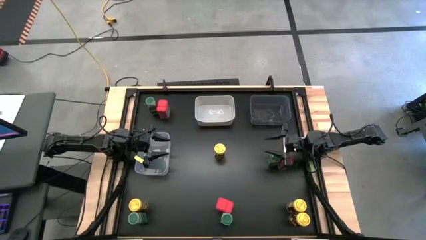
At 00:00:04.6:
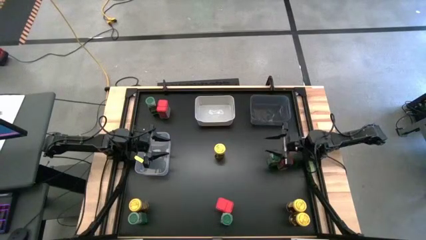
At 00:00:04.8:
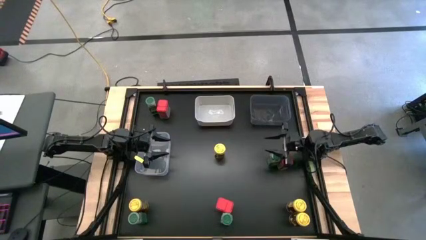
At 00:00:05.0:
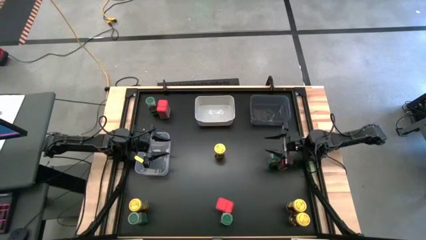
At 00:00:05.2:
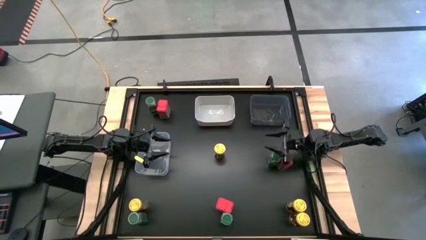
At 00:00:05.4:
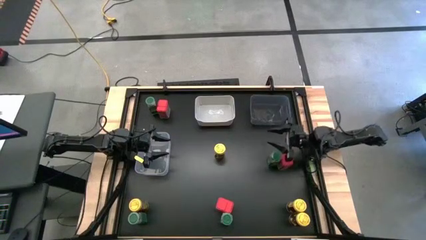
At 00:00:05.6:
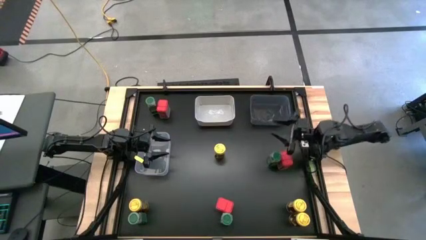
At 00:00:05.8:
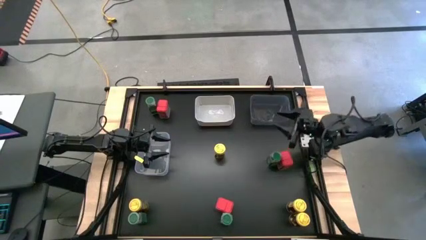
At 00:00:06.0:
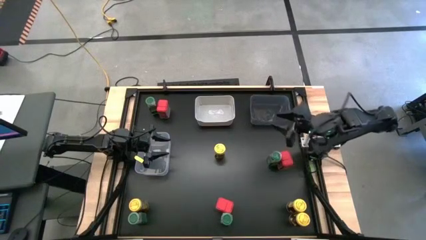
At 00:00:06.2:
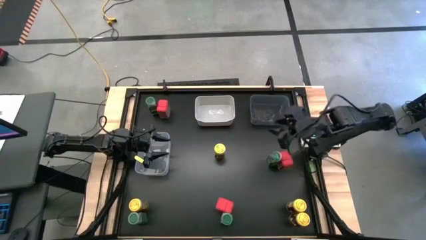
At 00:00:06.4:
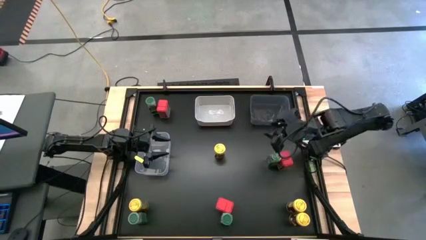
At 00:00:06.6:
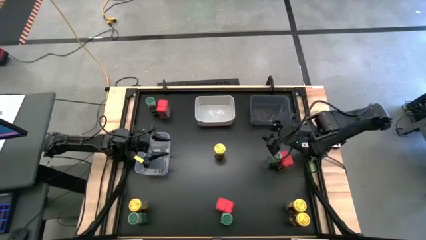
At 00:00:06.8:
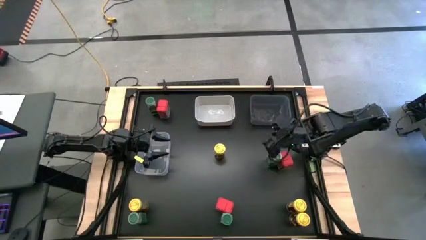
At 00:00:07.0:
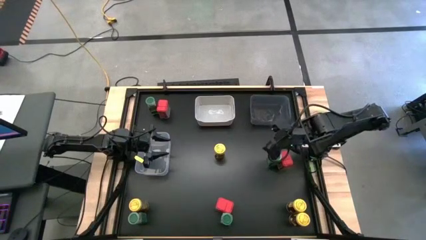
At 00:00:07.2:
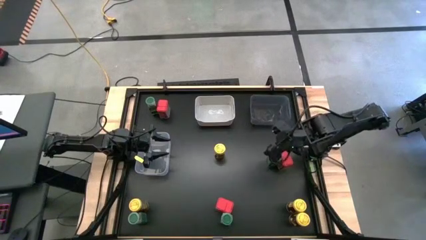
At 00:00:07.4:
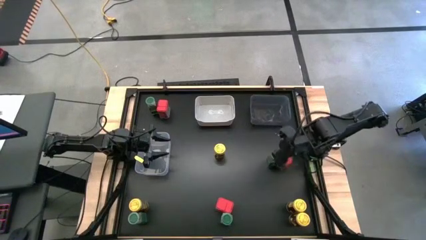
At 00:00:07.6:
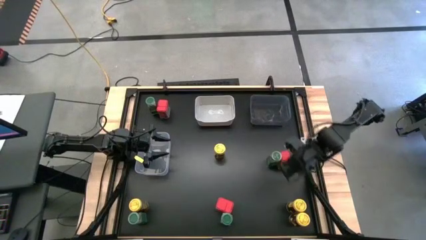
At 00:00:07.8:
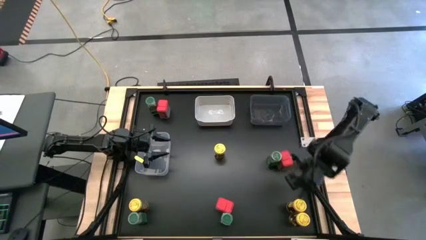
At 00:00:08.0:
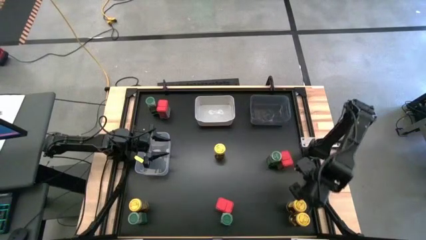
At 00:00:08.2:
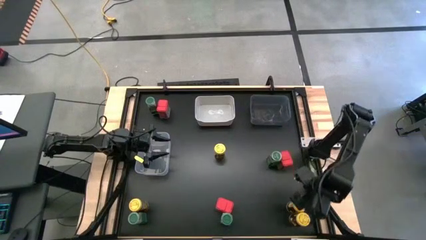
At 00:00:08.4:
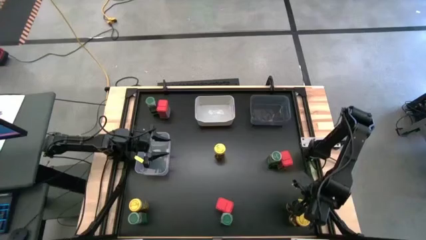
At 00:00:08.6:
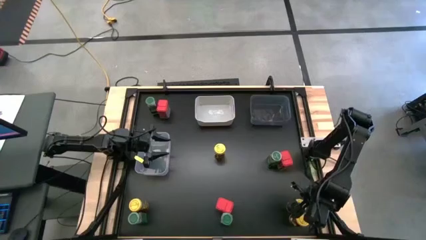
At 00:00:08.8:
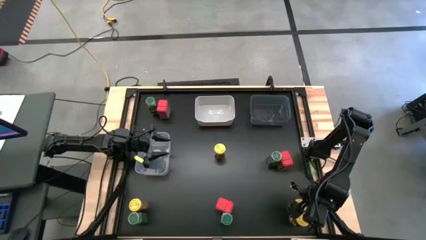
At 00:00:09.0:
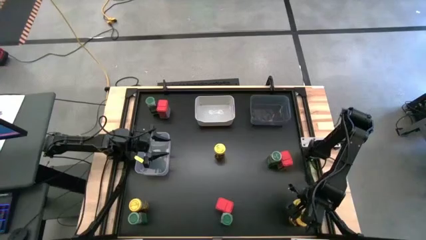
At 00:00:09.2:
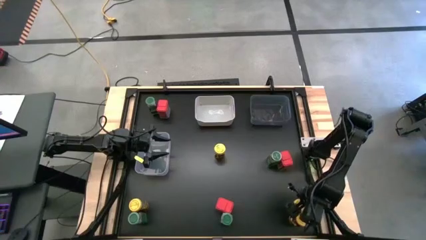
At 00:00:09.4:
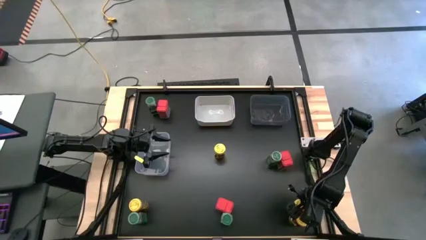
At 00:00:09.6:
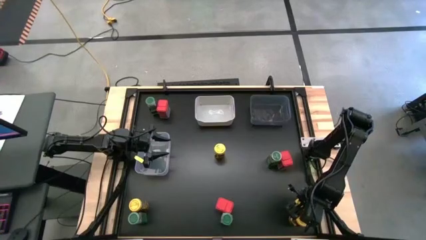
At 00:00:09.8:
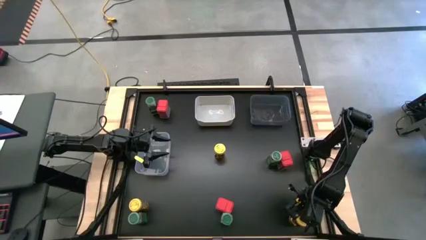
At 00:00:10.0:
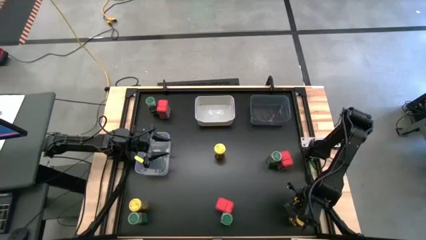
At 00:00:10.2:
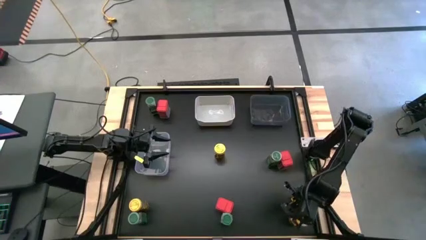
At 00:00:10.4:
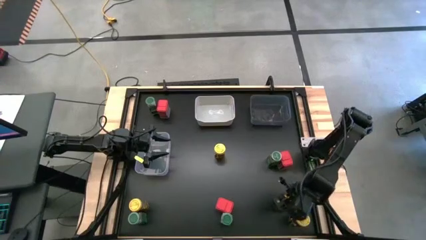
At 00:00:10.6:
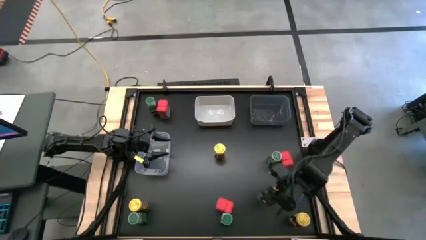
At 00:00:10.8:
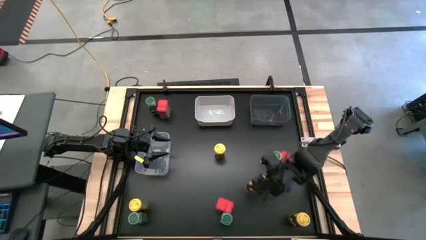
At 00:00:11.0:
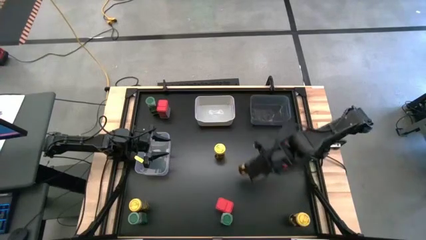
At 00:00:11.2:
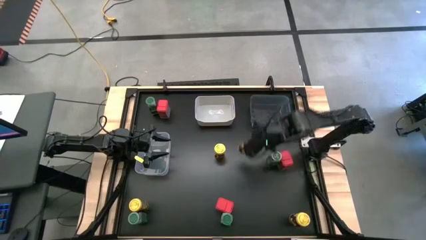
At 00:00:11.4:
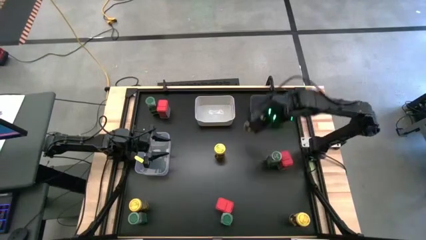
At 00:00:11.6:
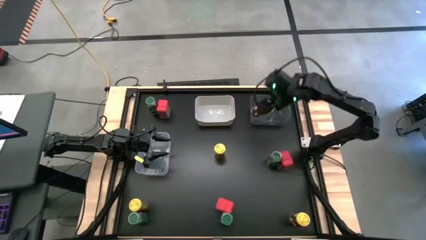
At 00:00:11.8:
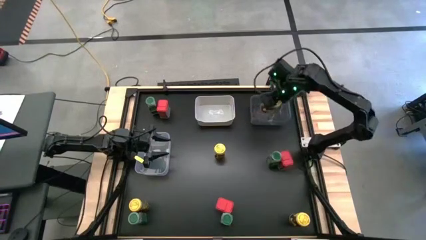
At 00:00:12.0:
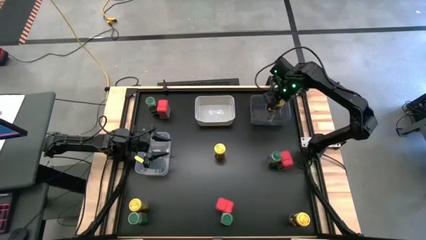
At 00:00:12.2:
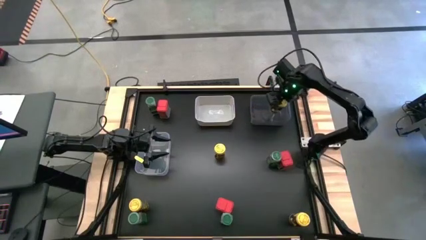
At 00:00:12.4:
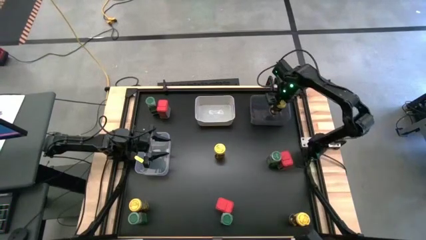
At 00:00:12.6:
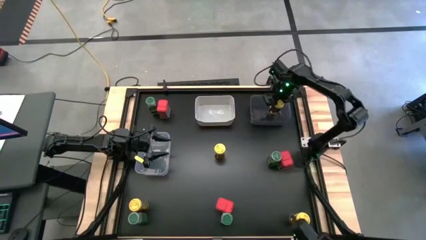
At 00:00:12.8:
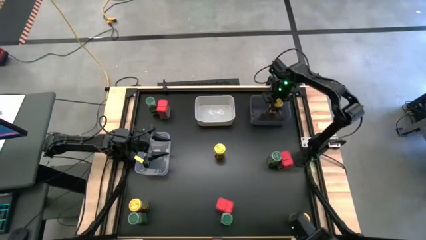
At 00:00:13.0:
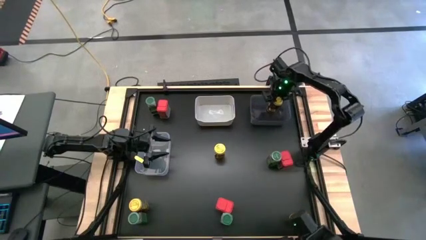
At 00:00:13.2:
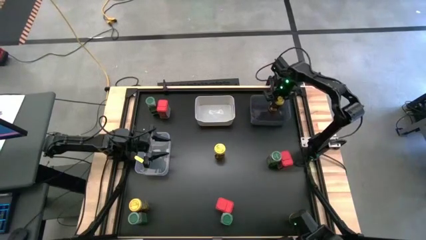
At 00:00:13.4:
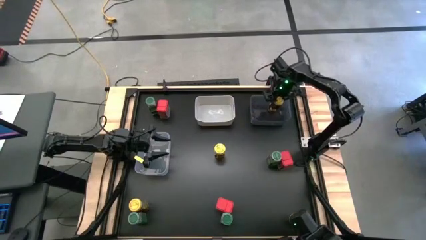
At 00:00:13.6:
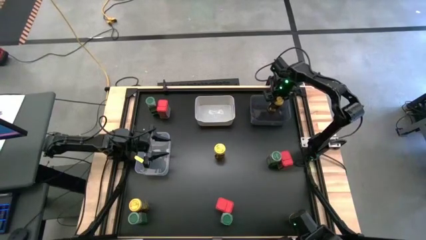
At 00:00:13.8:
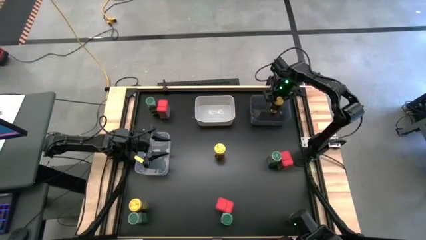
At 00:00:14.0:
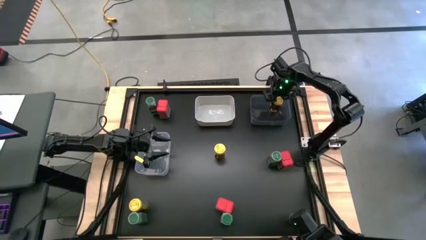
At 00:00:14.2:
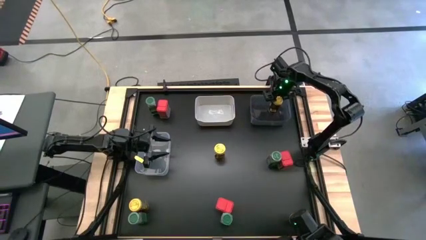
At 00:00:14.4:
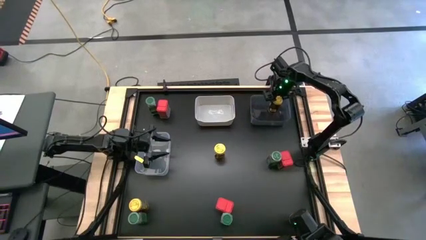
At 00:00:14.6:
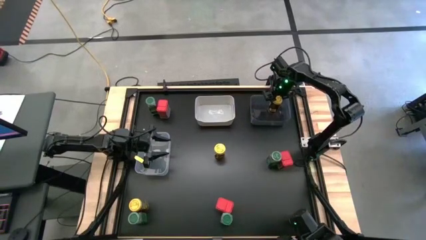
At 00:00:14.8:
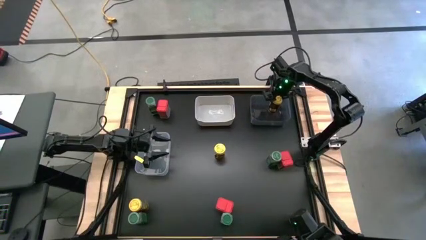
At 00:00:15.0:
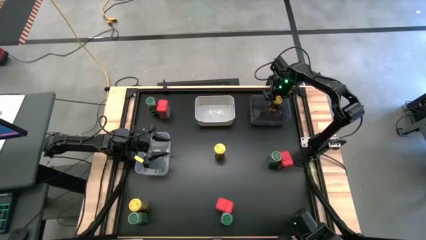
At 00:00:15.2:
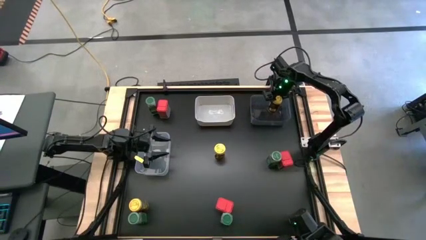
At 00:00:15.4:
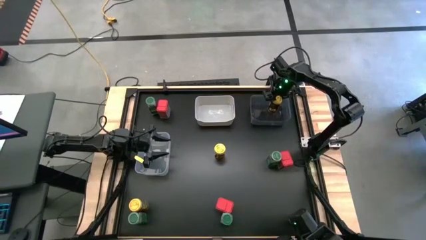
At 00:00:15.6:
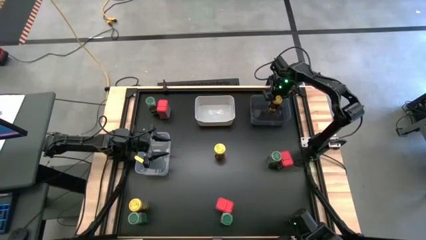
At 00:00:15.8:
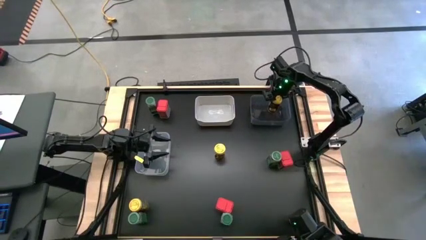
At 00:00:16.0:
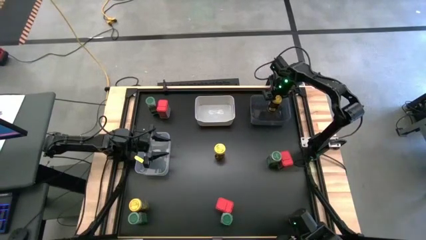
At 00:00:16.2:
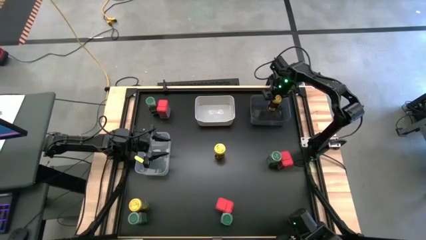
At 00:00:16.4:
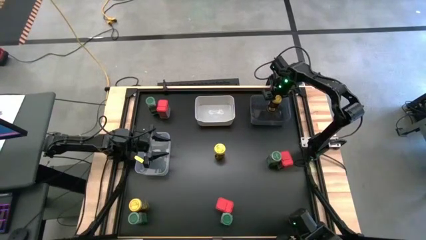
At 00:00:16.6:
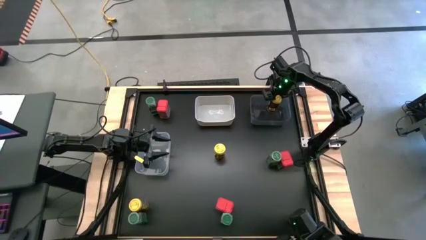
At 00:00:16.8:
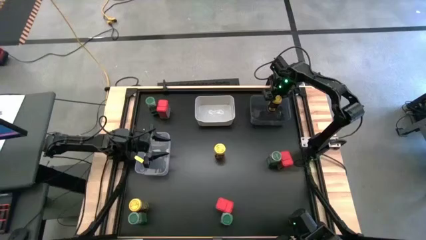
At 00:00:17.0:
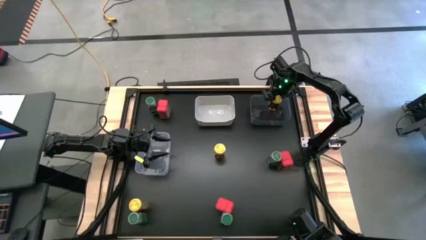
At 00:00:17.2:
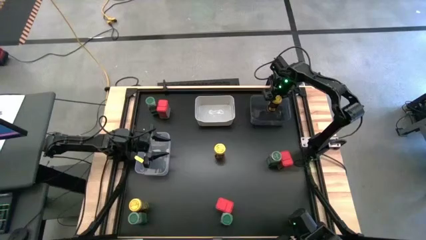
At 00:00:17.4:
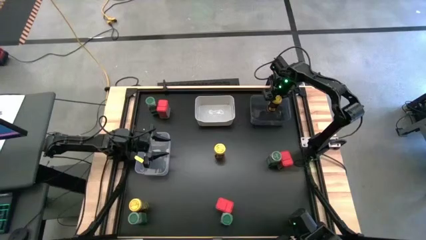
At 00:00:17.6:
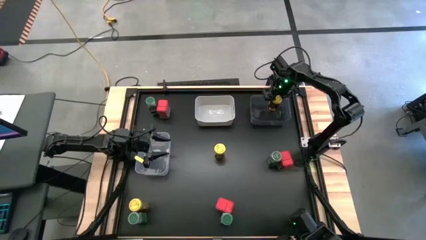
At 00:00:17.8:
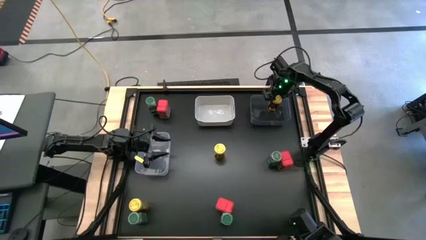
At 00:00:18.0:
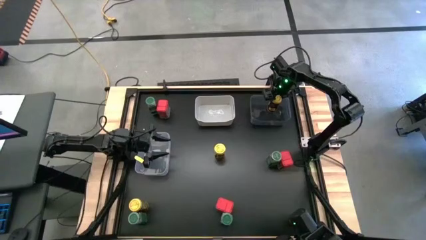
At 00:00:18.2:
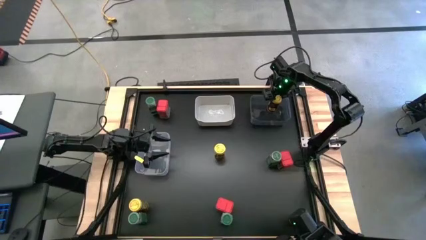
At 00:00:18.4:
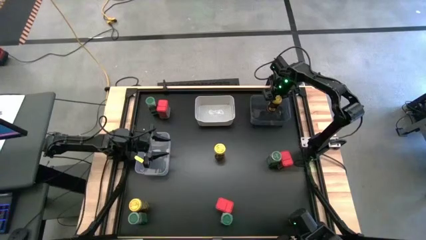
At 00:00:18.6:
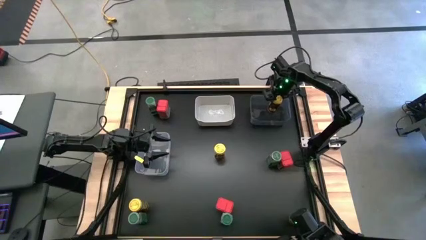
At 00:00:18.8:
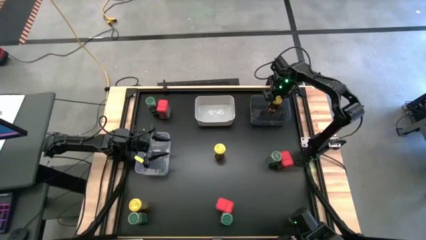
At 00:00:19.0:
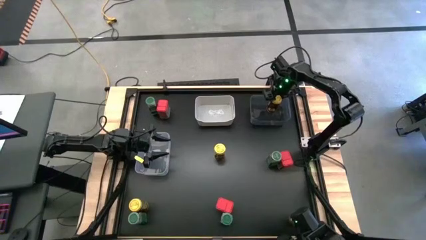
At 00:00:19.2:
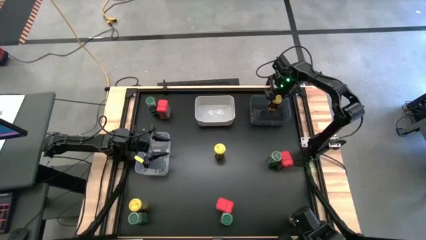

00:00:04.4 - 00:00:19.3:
Task: Sort spices by type
Put the top right yellow seasoning bottle into the black bin
